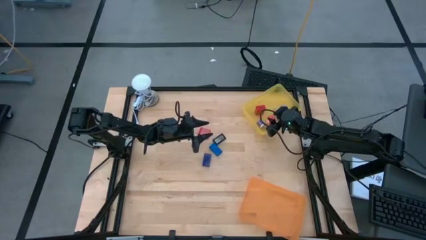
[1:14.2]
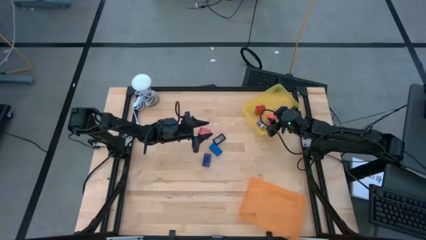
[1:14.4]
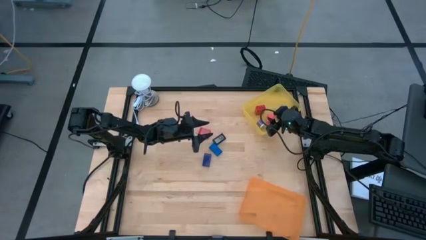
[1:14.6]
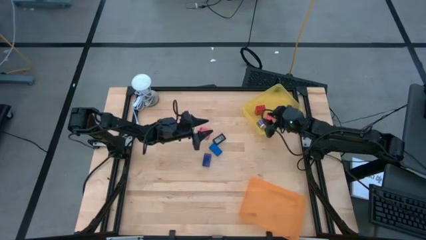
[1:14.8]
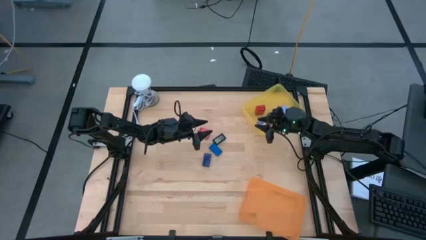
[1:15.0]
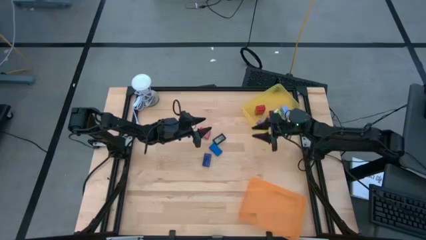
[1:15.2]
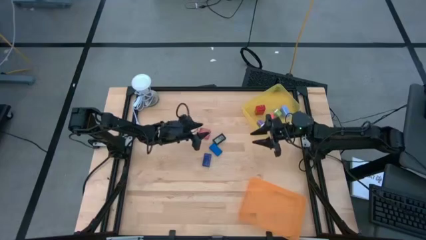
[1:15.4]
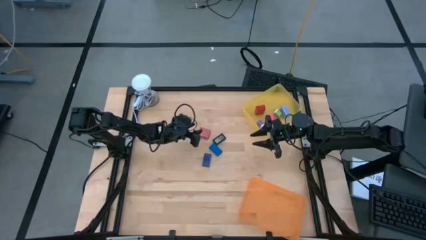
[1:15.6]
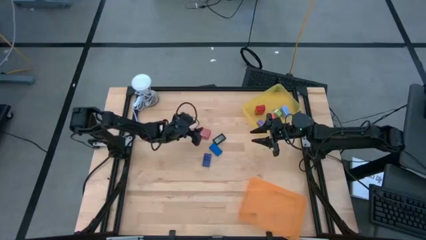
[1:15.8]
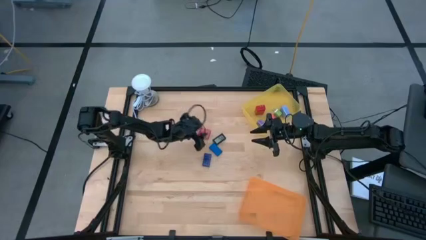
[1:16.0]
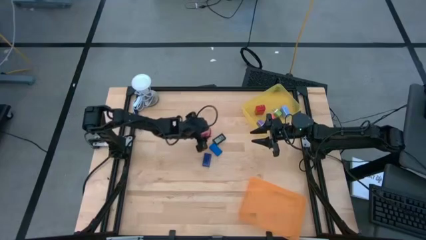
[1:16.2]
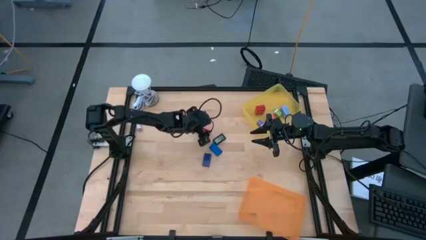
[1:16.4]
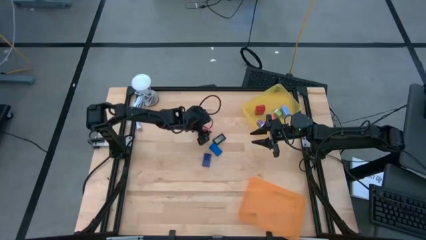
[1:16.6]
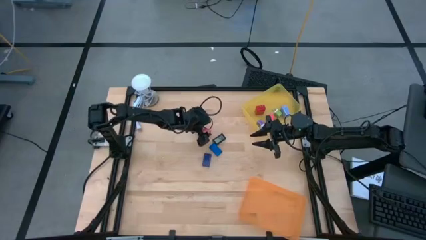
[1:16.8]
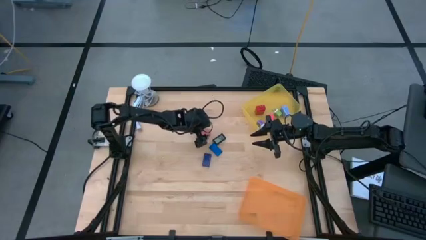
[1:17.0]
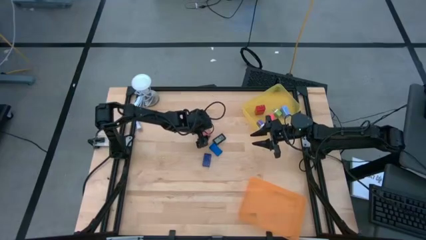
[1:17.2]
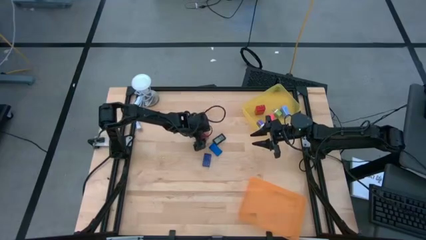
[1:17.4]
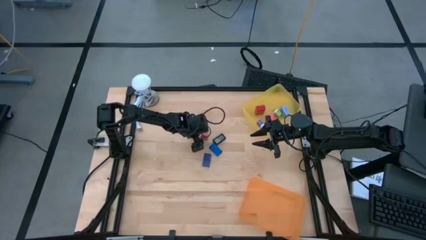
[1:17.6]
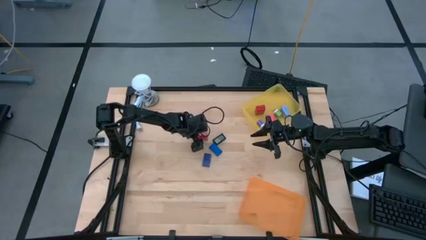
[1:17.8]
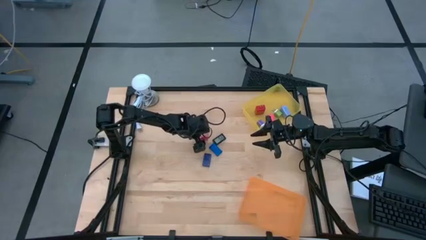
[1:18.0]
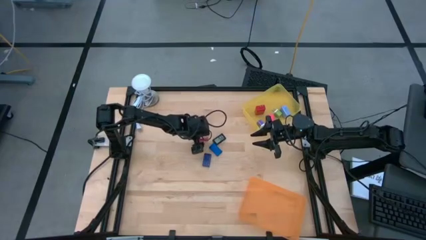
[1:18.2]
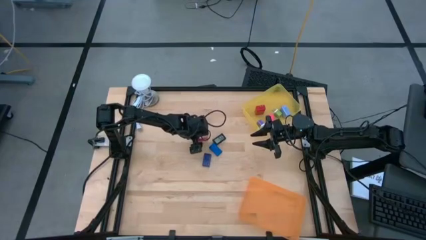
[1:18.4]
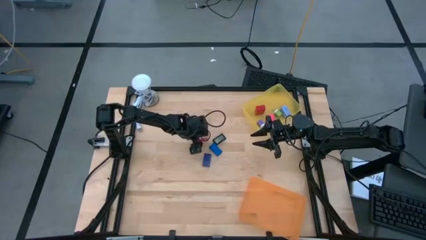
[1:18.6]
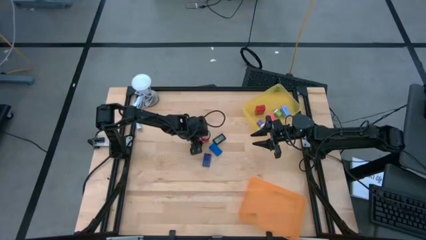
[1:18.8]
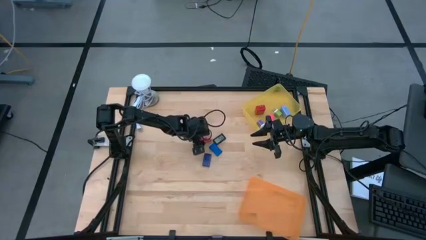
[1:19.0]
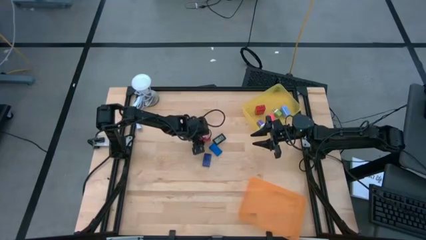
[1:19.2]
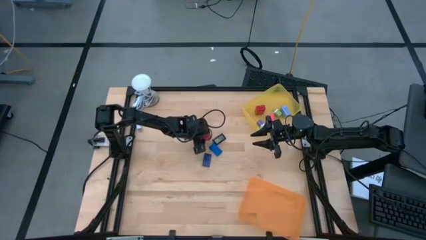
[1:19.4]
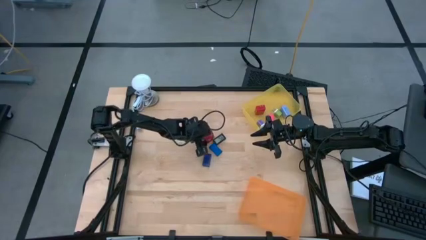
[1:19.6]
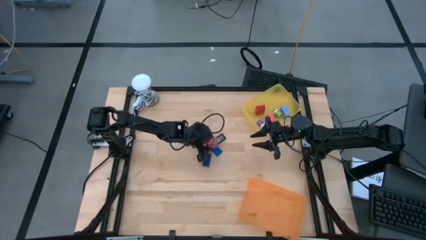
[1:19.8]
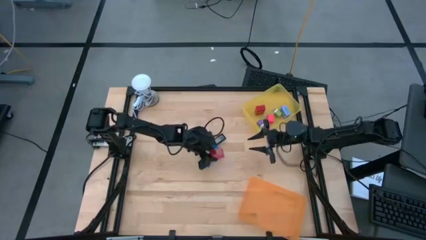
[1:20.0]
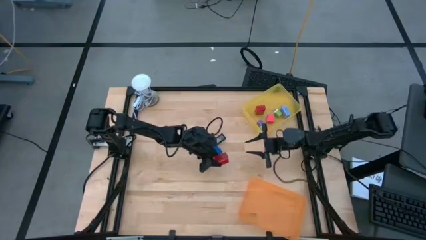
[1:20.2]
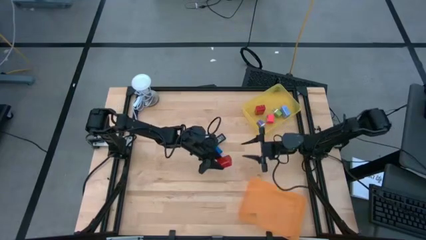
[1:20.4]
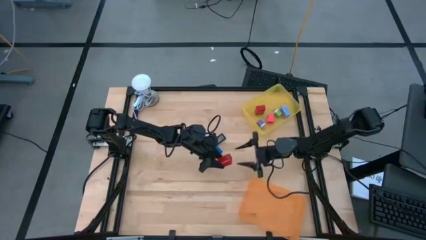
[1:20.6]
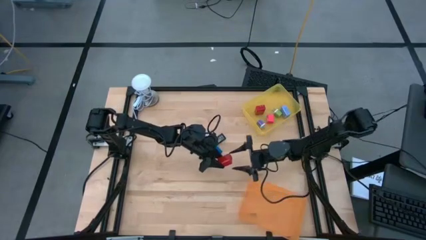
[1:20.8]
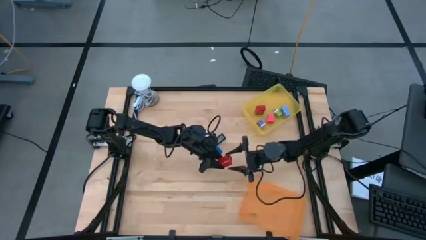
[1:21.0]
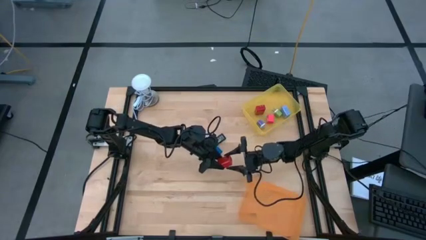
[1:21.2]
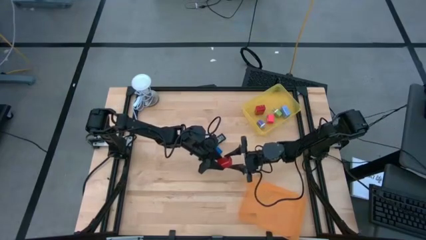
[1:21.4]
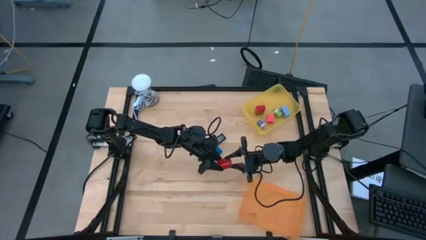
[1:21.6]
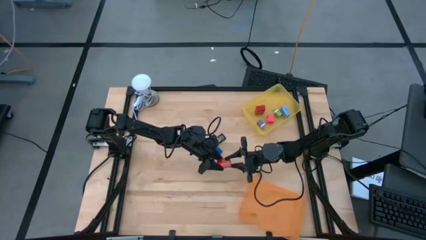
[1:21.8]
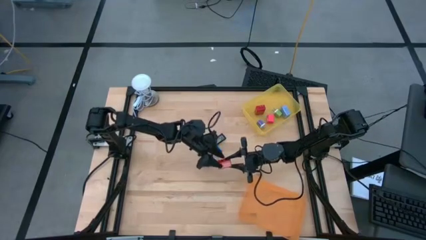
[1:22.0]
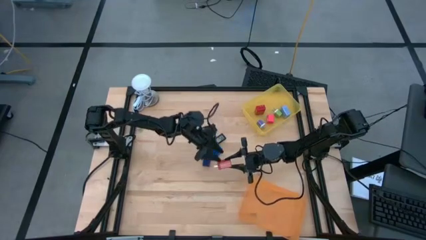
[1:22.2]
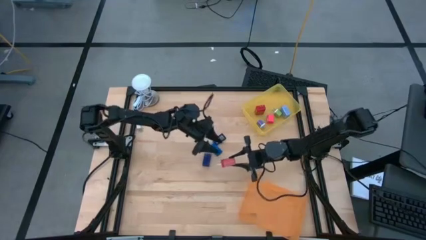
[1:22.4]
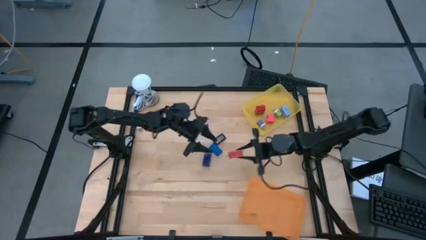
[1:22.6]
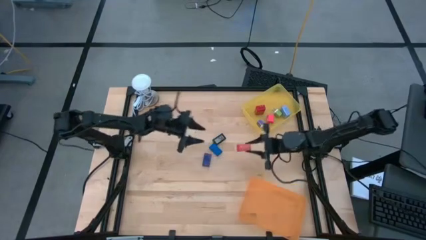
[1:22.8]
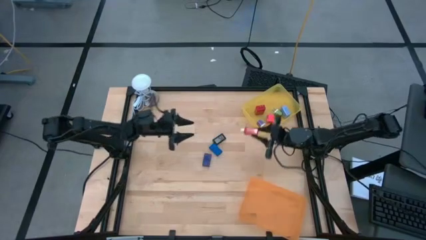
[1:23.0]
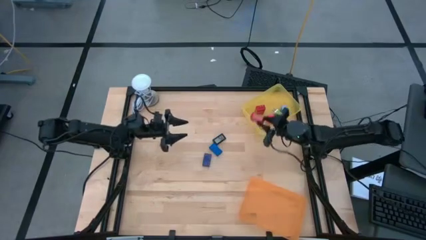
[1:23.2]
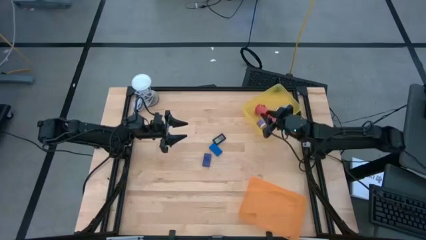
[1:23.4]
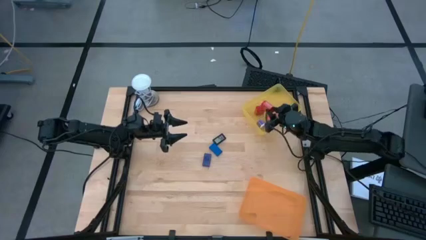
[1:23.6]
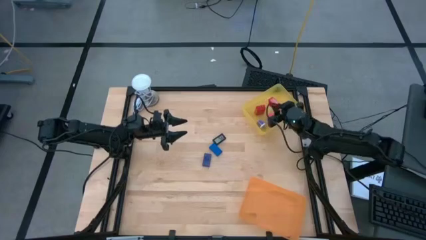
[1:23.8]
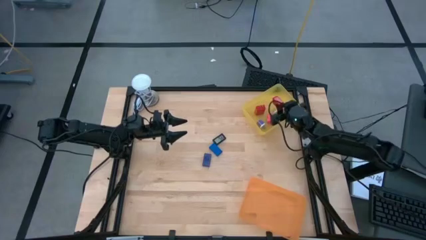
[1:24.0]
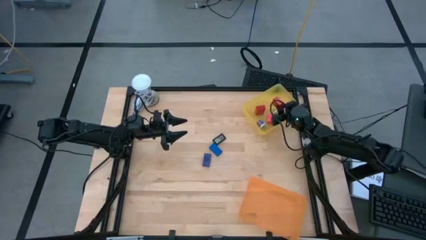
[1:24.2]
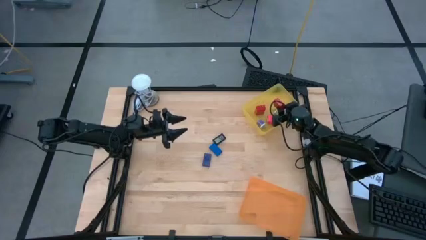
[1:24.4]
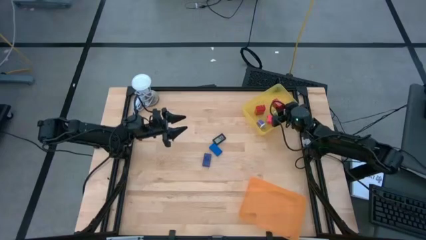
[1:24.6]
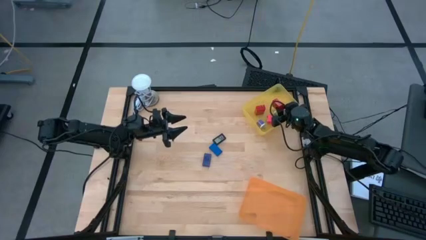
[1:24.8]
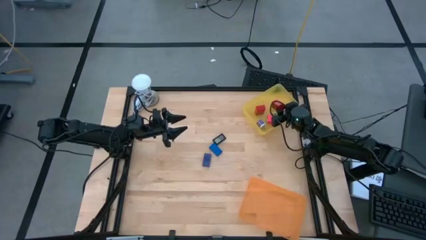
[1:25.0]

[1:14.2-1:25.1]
Task: Pick & Place Office items
Put the red charger adapter into the yellow bin
